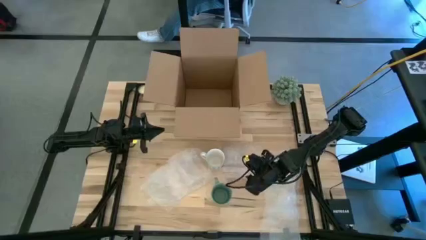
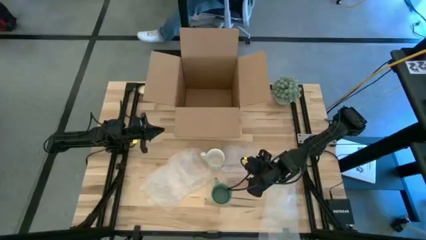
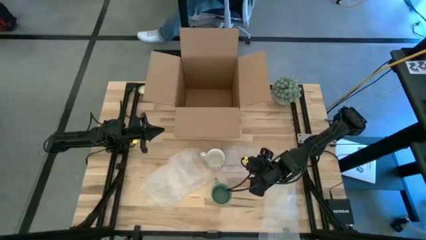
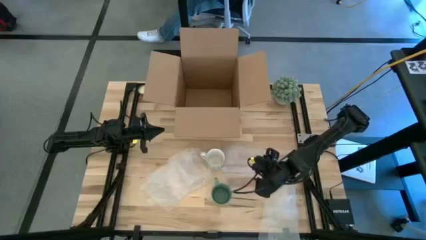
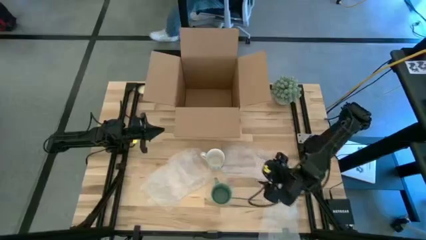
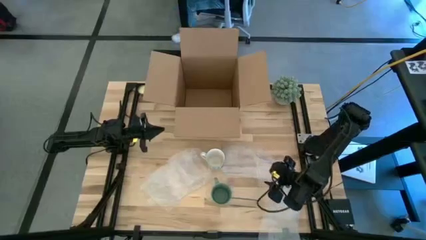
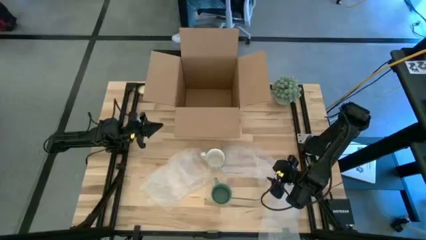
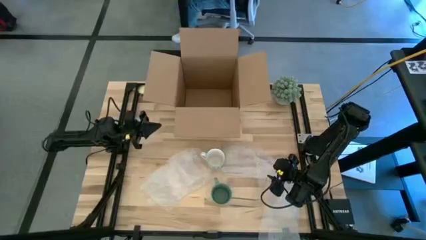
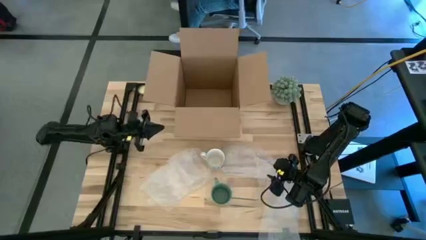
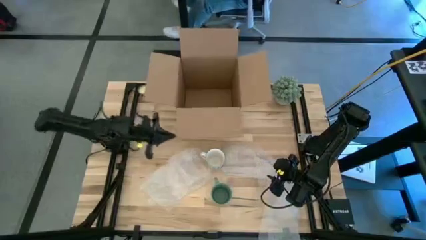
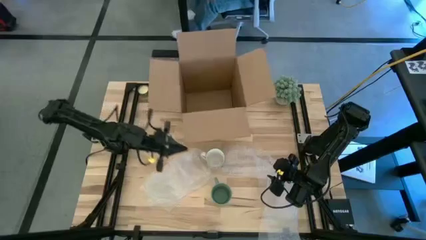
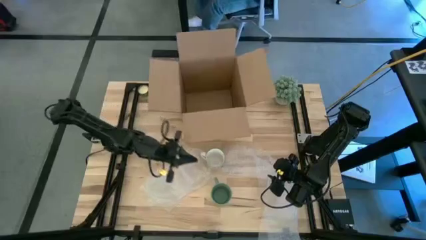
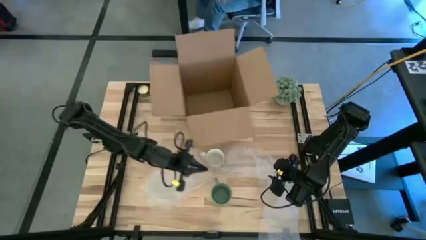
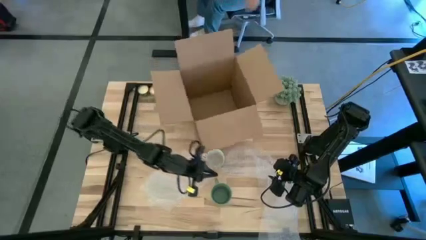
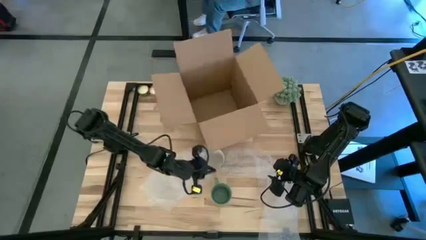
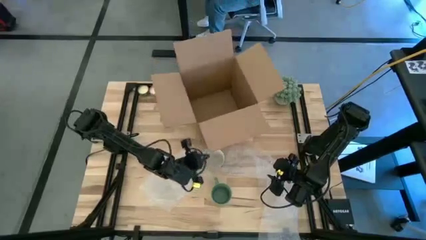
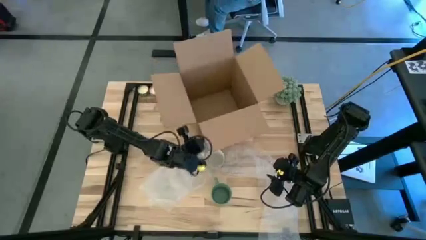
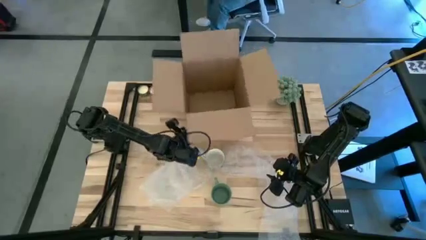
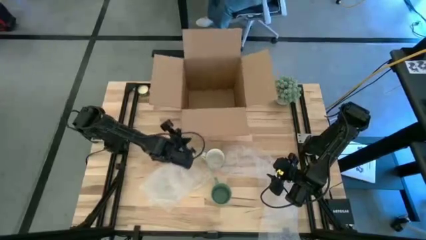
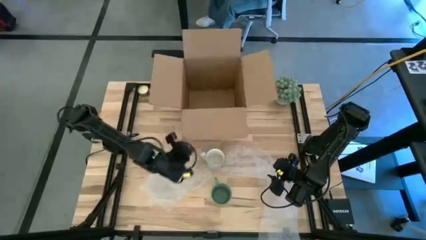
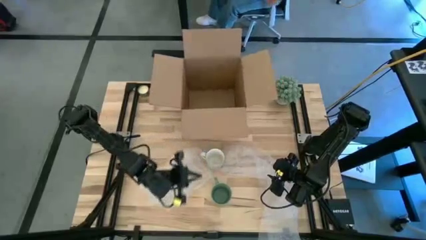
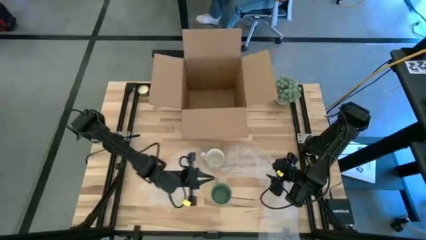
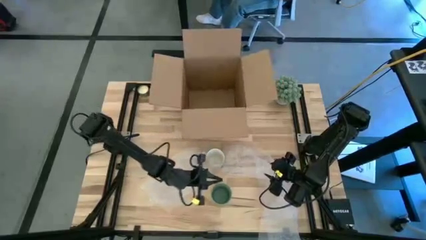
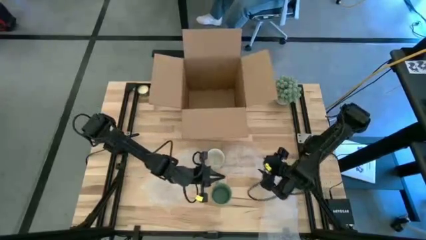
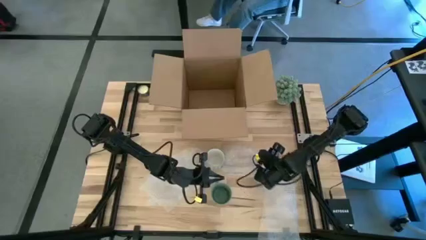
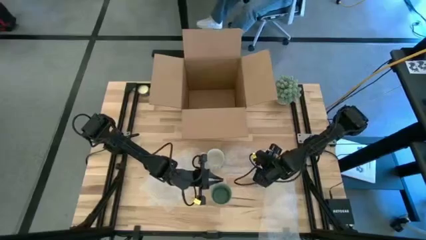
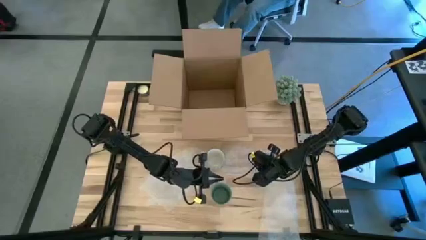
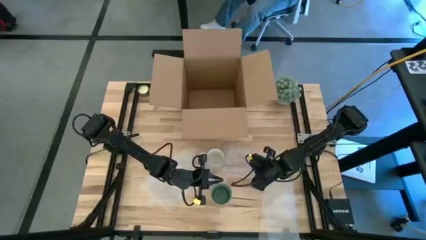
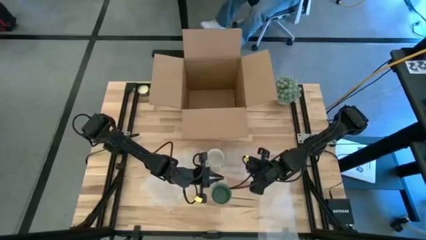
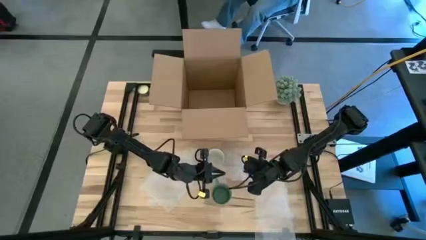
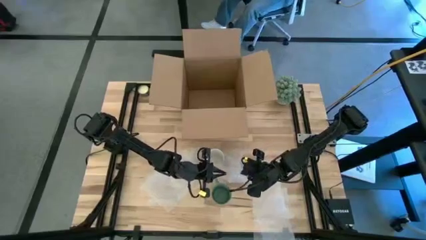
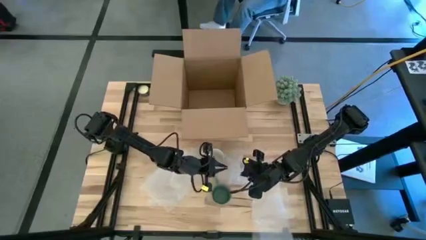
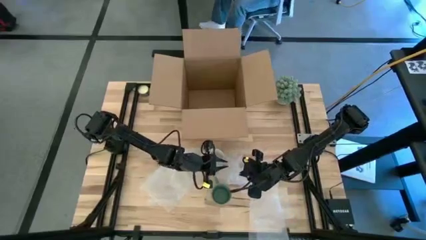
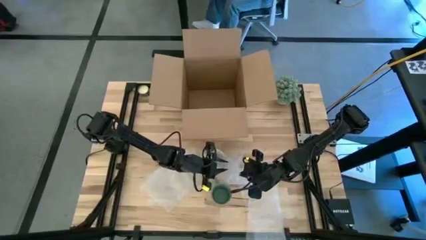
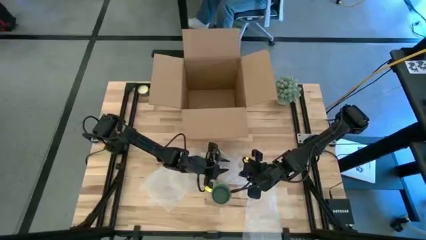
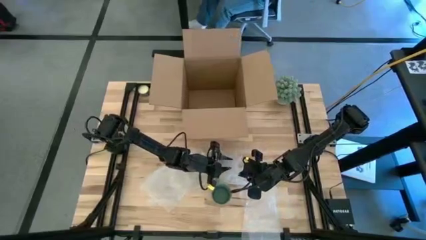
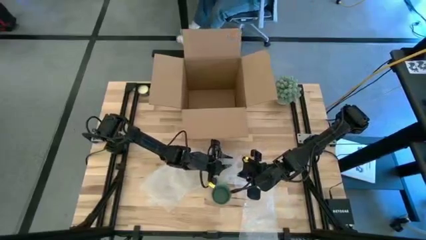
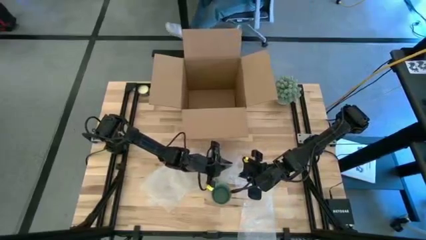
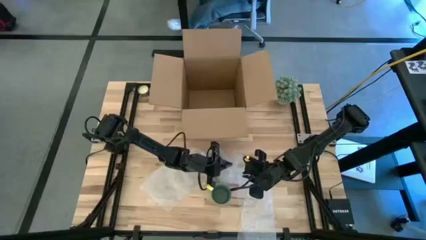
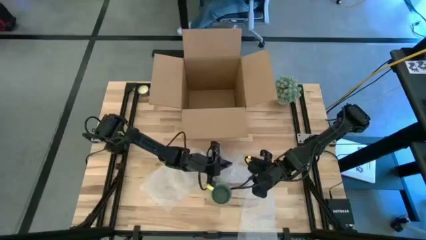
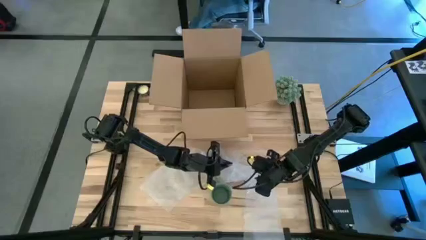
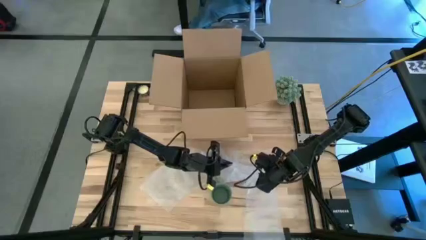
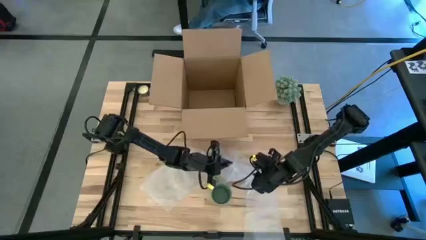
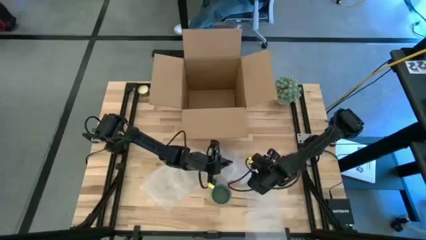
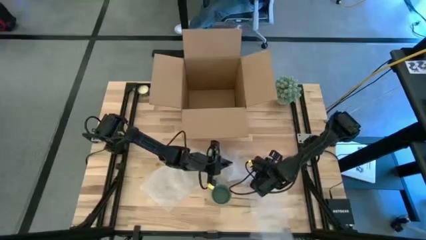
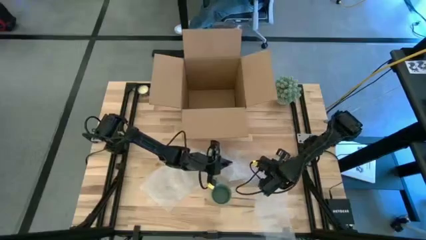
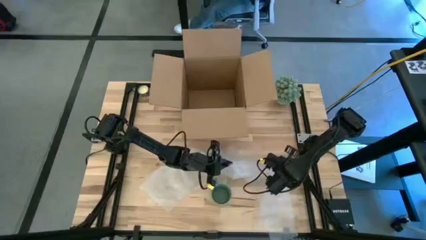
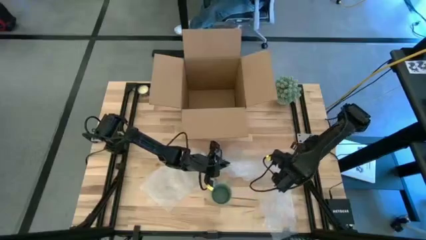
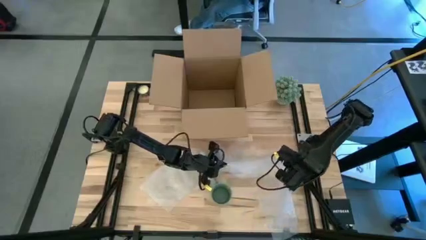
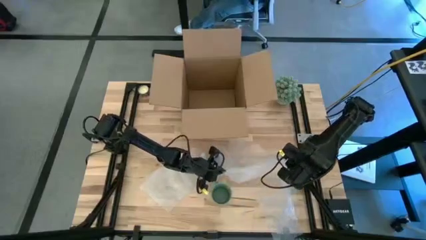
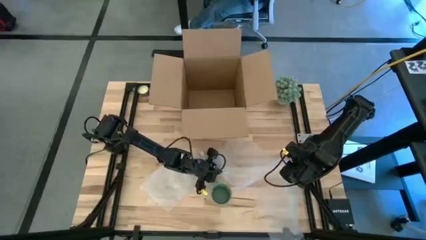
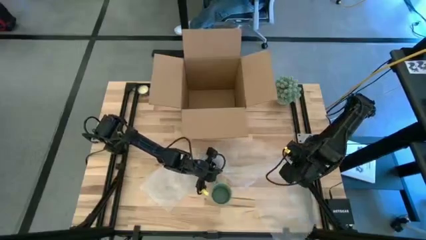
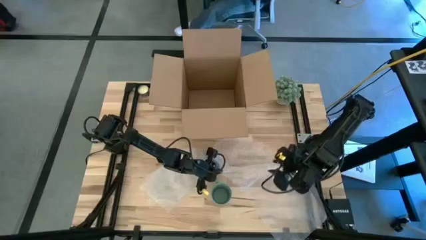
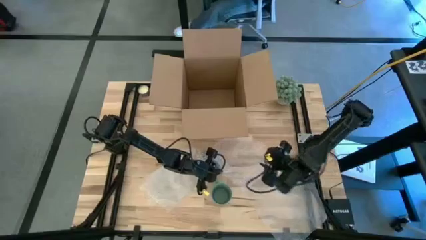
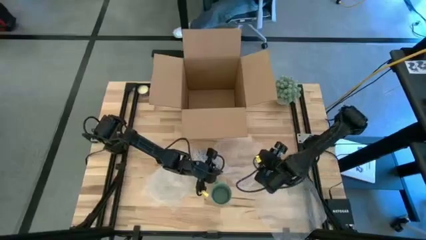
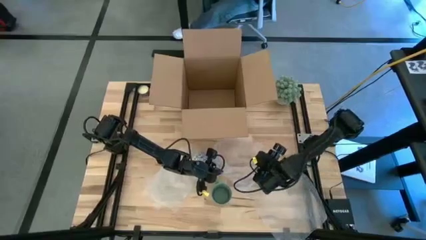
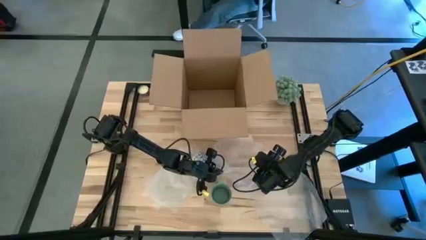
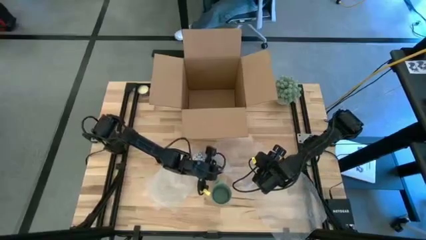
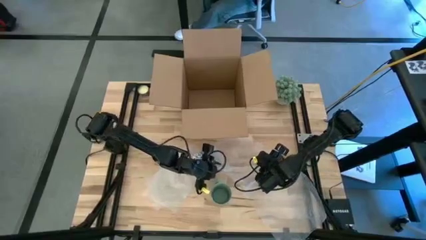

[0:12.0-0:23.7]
Task: wrap mug
Prepare the right transparent bubble wrap

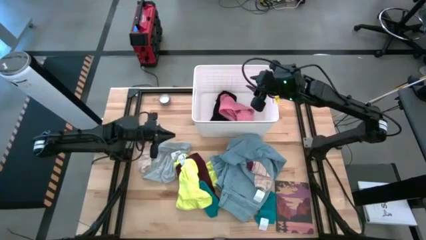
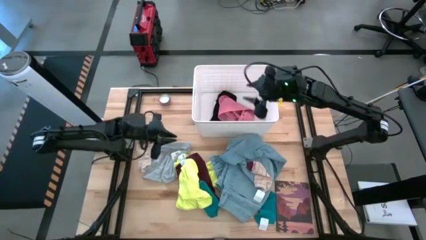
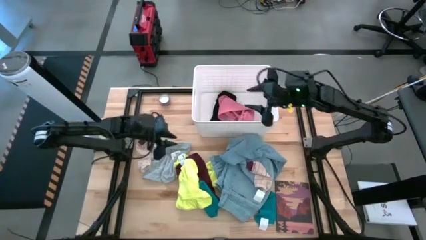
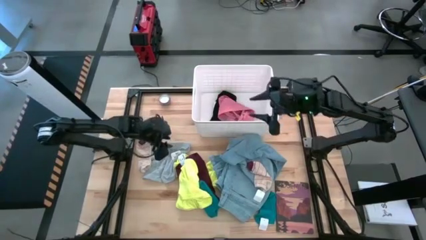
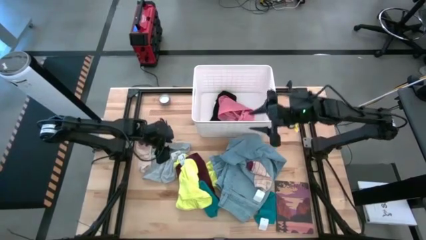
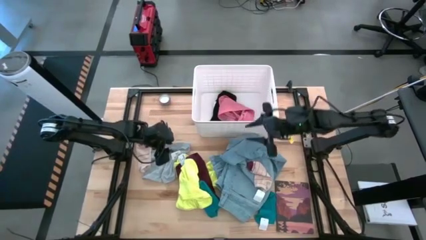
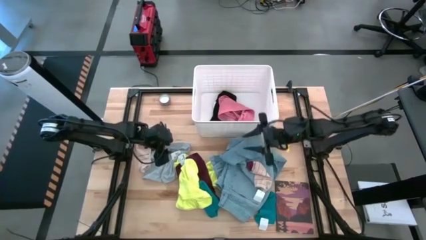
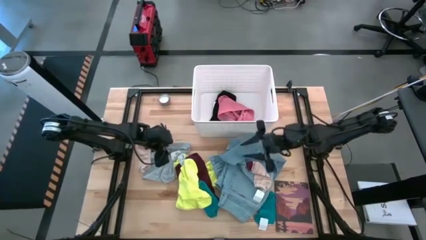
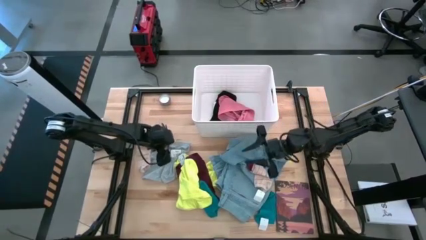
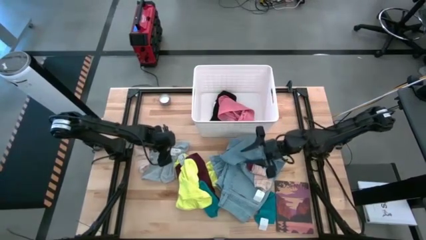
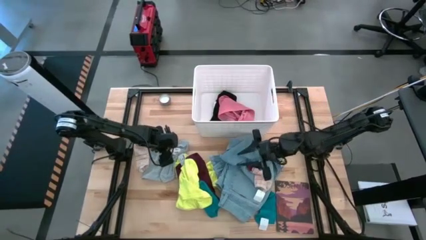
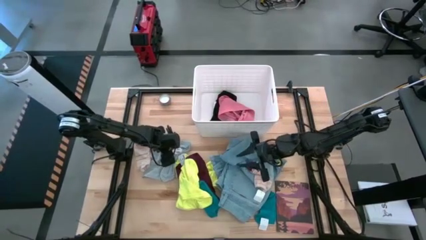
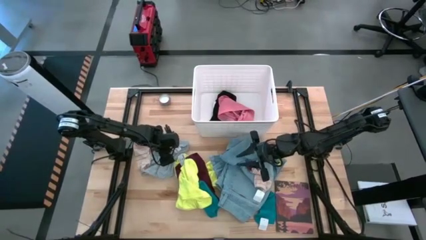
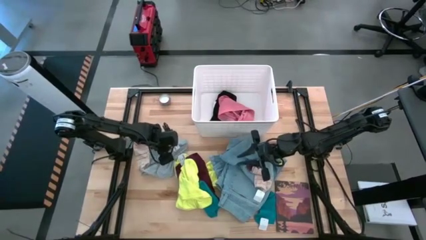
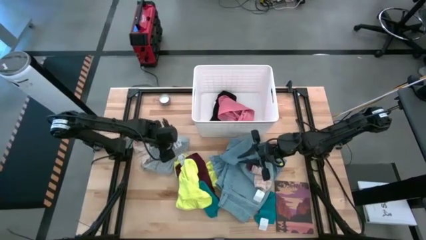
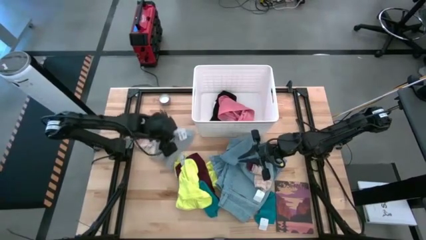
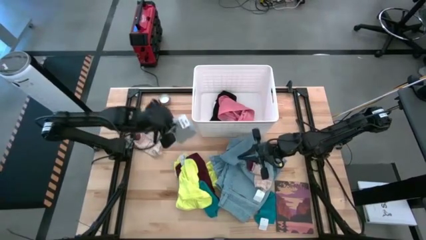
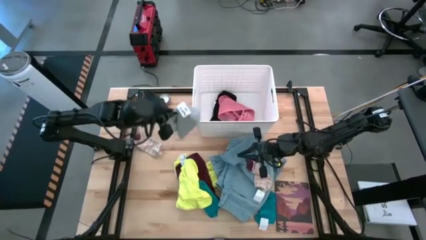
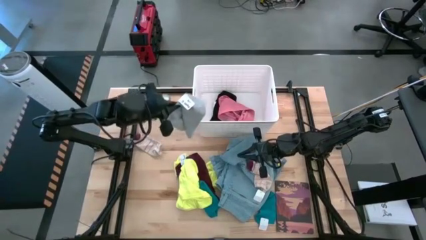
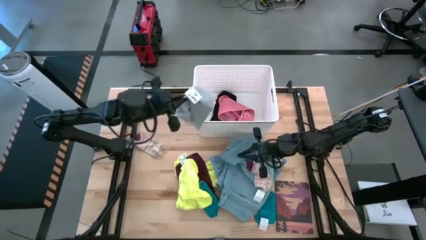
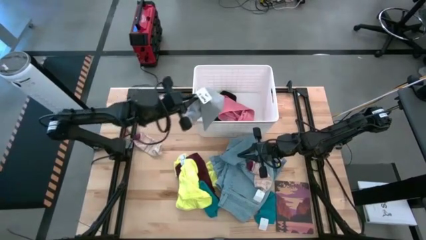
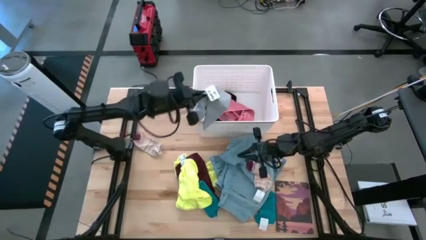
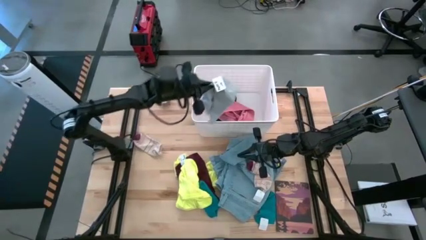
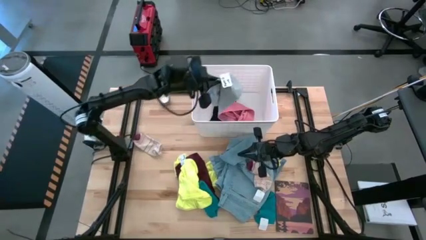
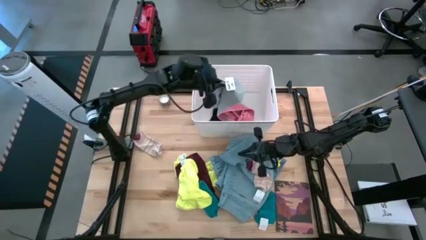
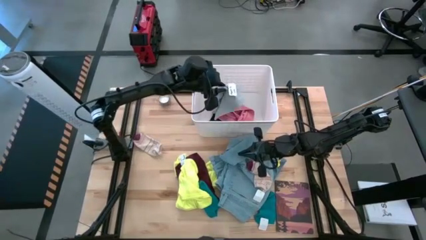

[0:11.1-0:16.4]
Task: Sort clothes
Put the gray shorts into the white bin
